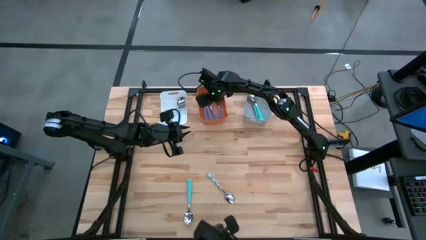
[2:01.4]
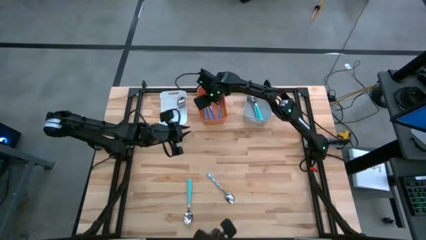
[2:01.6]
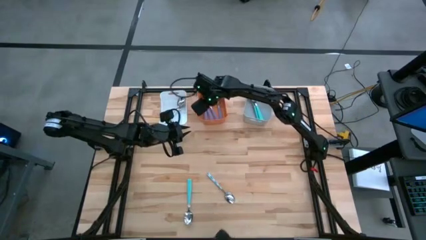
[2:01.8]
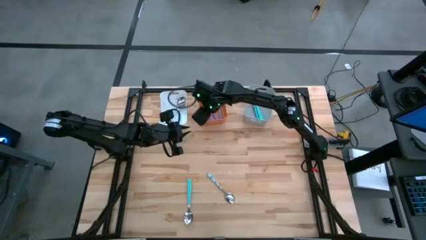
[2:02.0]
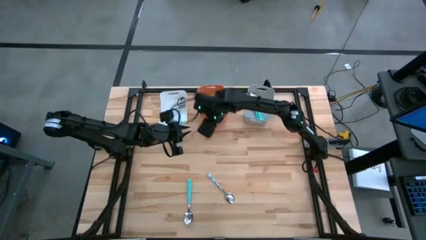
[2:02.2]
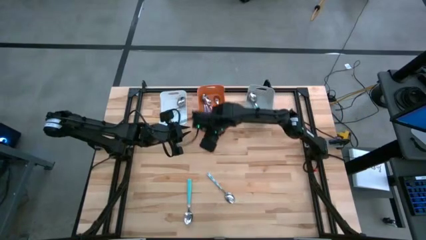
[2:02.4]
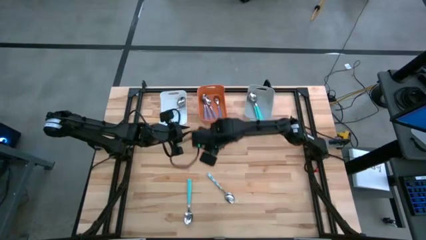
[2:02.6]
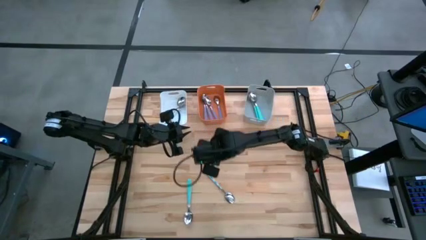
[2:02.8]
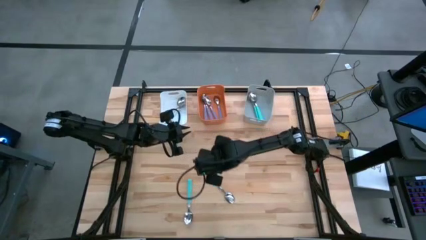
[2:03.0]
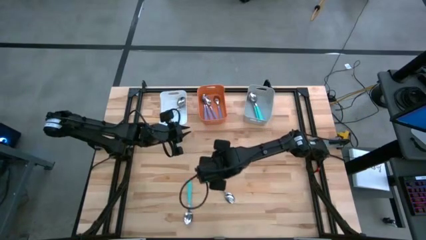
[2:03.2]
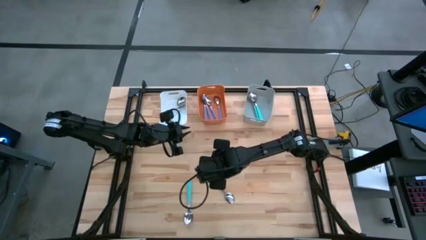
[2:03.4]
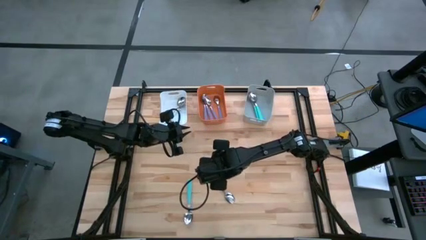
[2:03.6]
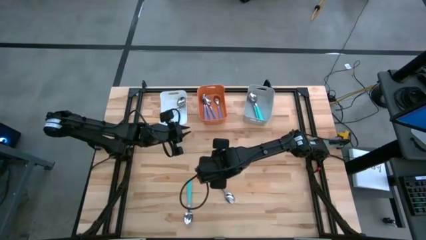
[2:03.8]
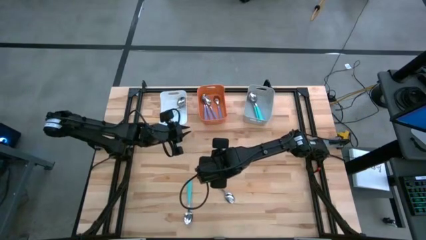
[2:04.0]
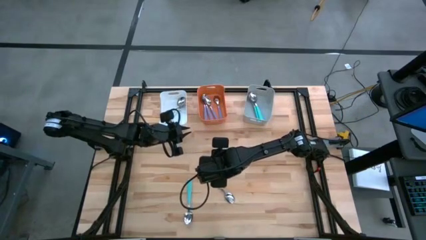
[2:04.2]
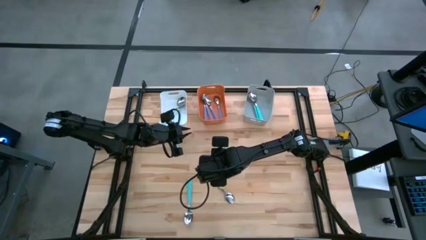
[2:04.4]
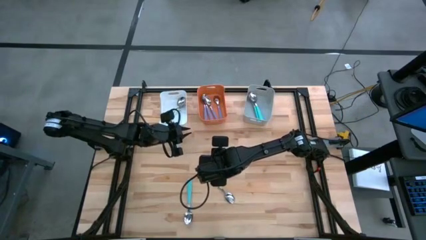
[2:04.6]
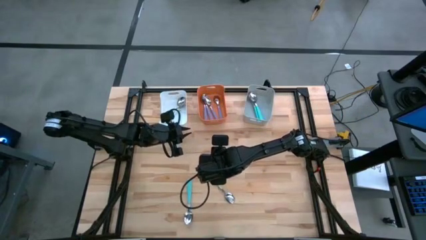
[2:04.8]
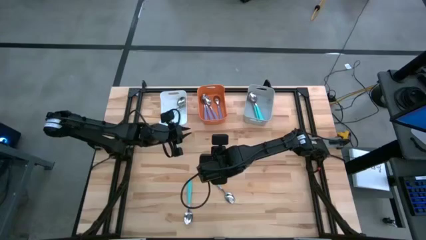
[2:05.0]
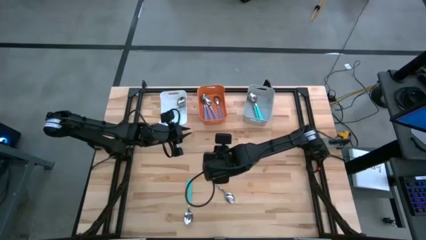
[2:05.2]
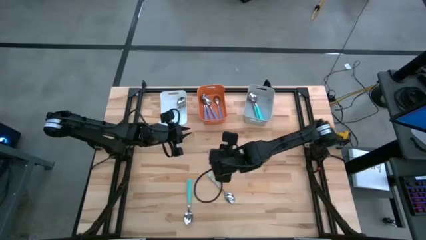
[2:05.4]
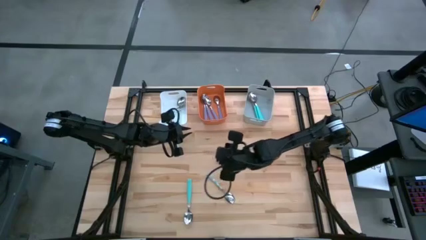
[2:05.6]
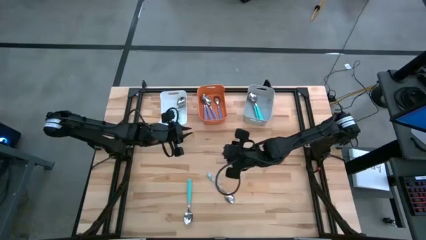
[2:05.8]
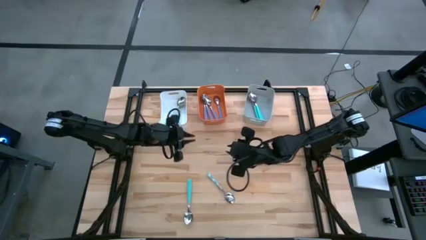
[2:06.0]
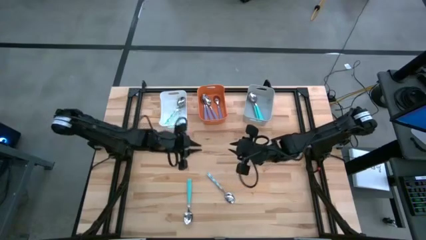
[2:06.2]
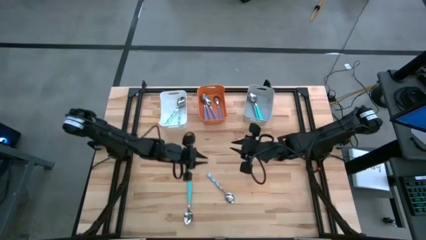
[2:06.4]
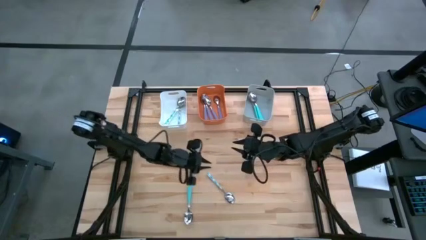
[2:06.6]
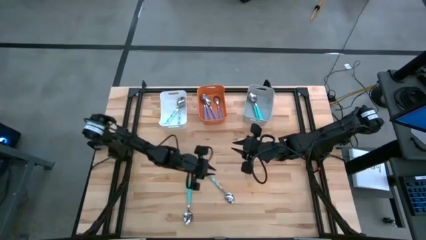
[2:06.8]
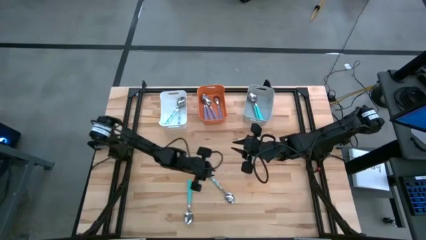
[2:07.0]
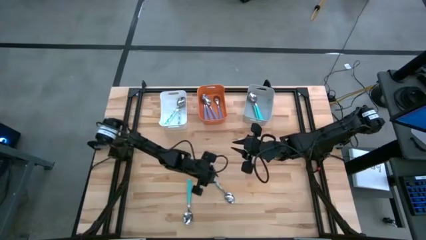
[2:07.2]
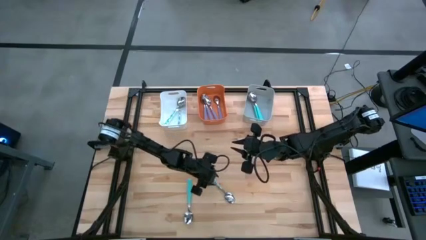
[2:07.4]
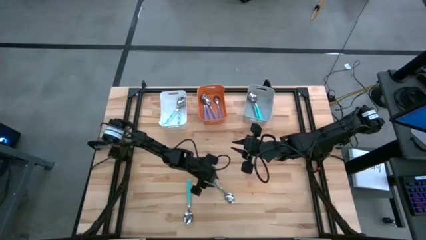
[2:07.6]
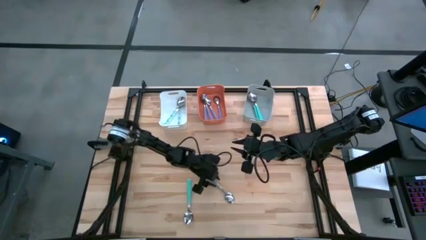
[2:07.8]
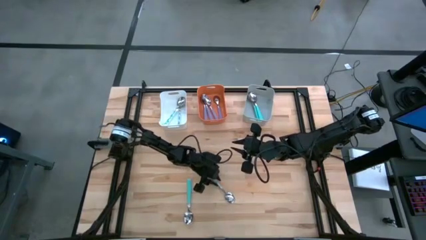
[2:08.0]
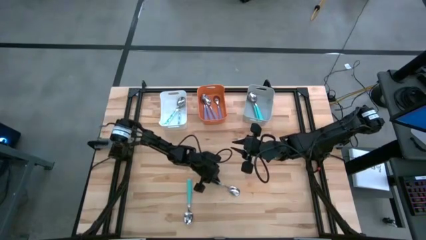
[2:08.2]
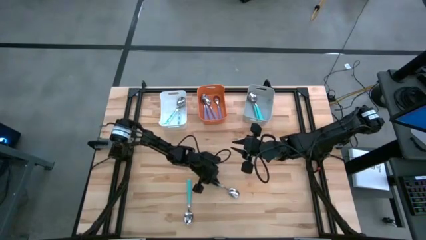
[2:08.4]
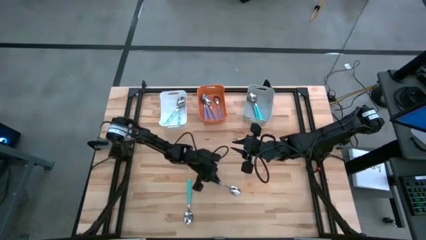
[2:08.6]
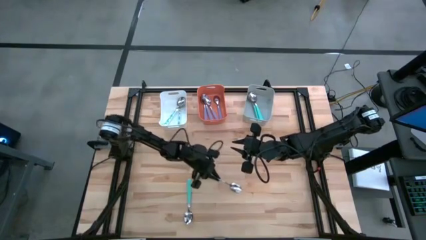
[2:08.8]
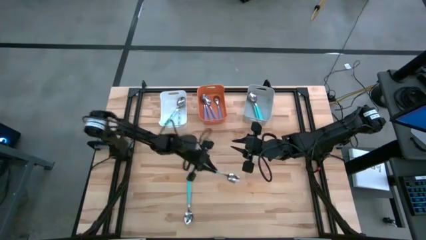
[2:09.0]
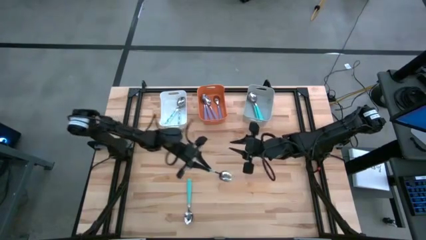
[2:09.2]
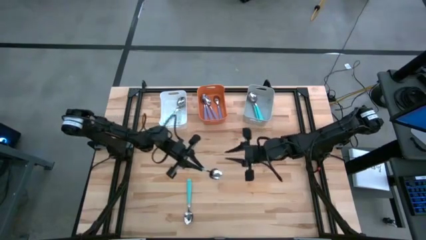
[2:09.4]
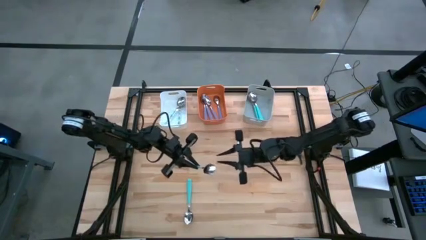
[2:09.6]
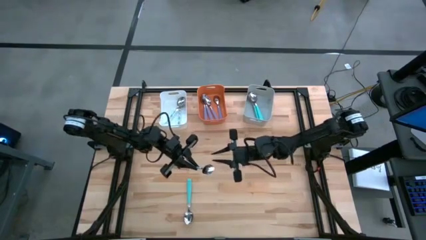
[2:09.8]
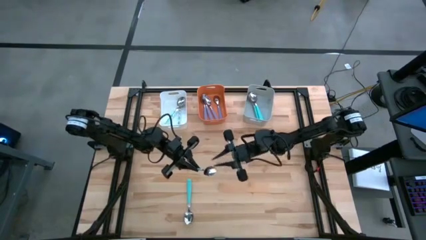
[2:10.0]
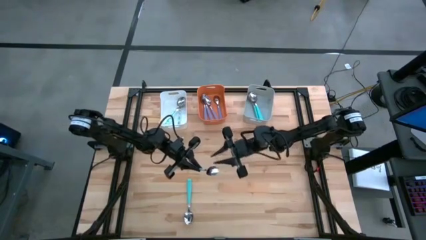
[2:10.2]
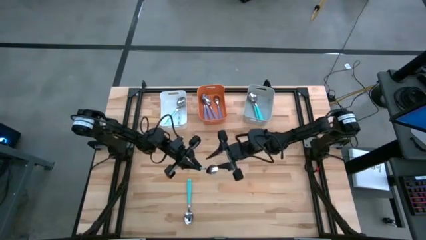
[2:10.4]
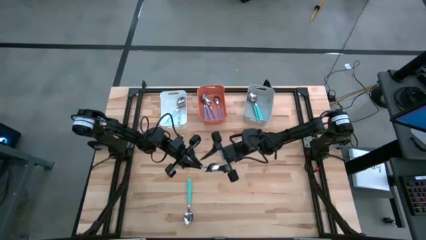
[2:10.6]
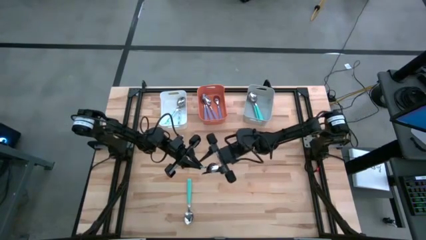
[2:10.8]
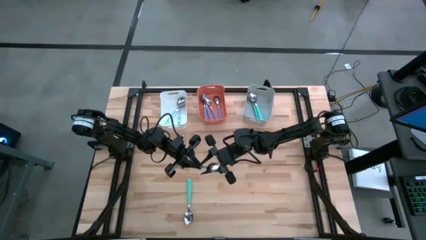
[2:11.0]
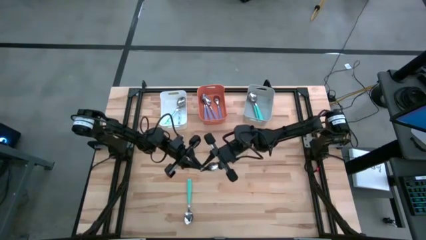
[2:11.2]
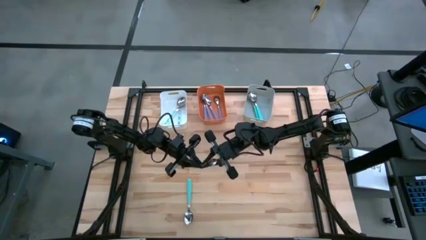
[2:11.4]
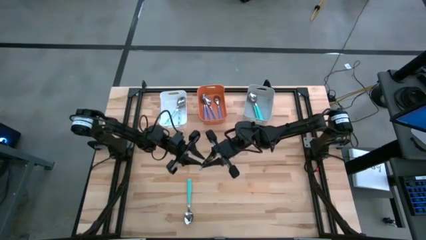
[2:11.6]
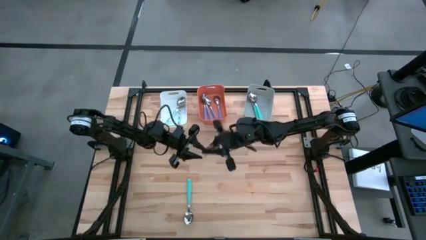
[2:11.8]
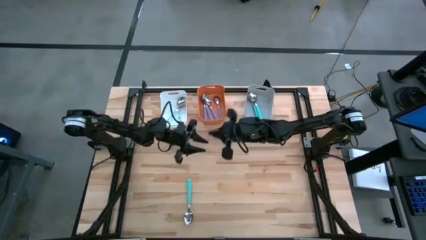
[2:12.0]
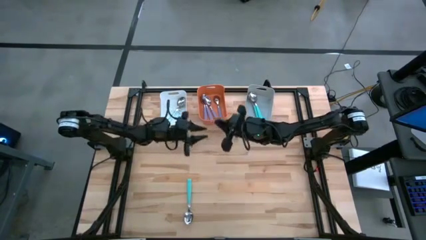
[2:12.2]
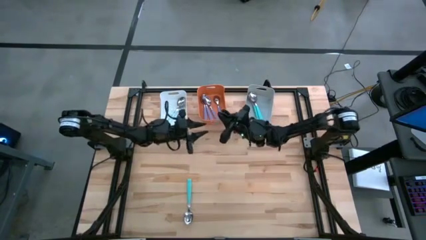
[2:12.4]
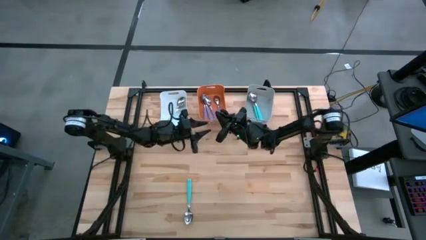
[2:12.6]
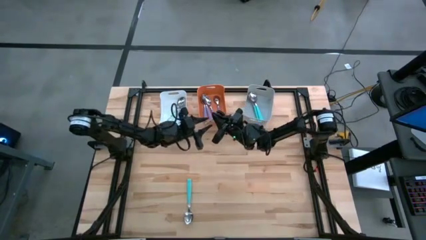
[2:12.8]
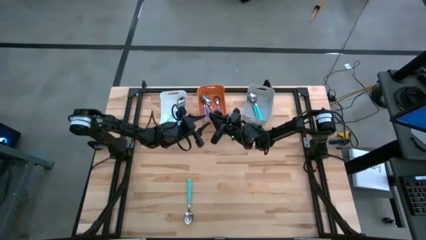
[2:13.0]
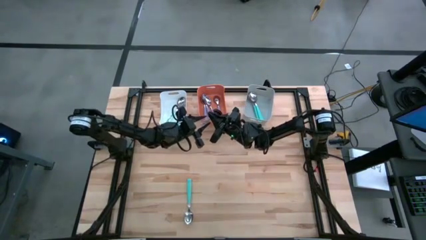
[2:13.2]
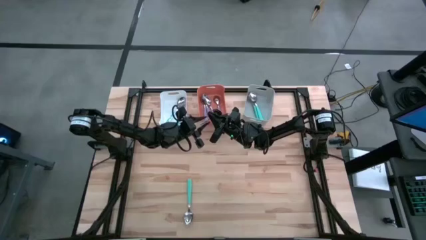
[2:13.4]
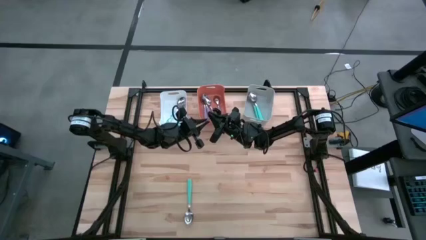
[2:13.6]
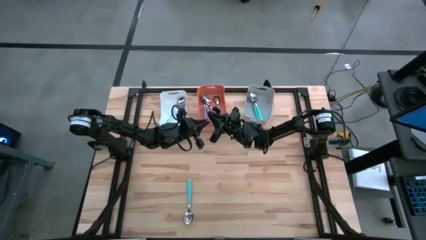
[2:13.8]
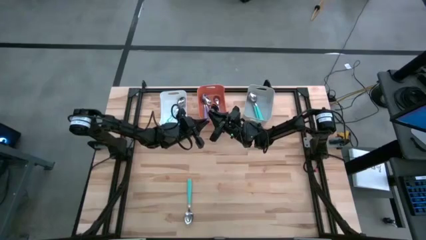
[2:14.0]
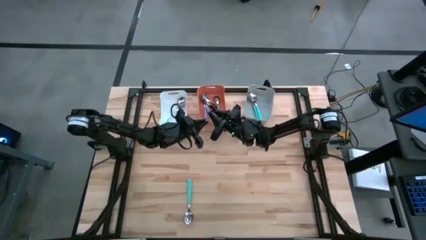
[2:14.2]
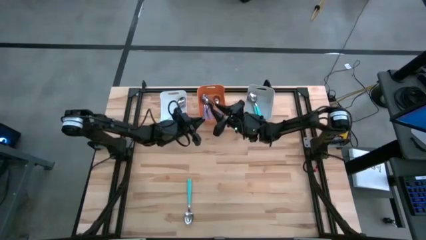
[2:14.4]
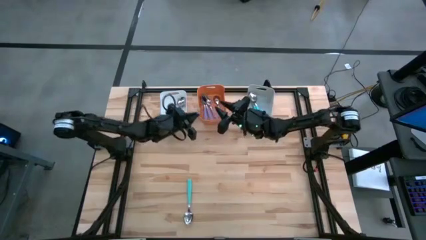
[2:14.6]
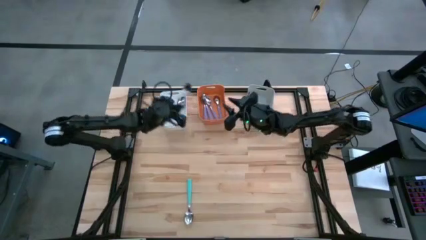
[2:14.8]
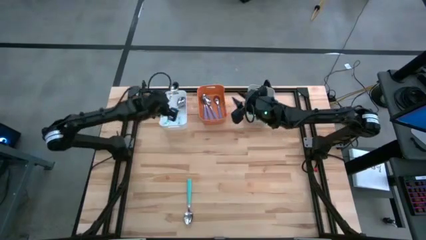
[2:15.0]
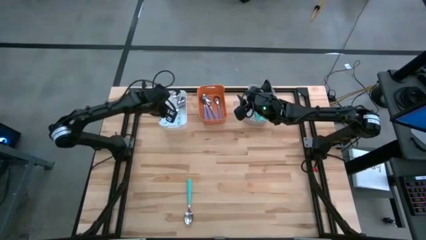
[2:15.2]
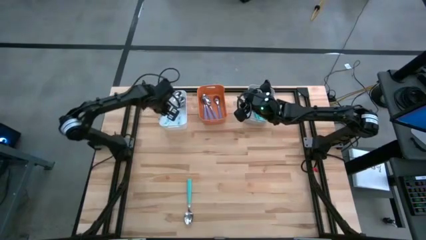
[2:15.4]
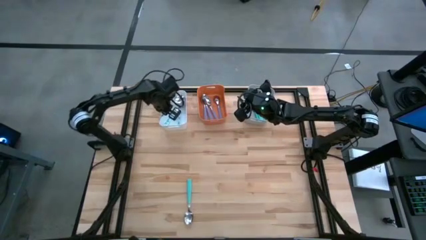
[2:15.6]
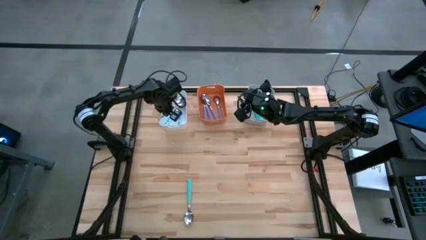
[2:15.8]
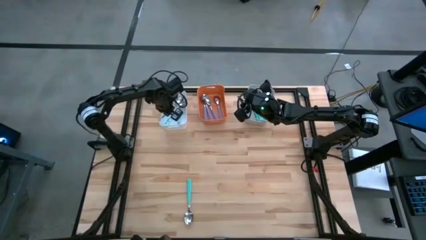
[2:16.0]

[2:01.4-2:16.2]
Task: Sort silverware by color (type)
Put the blue patterned spoon into the white bin
